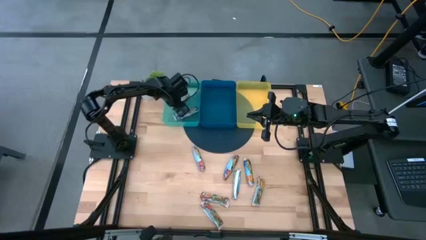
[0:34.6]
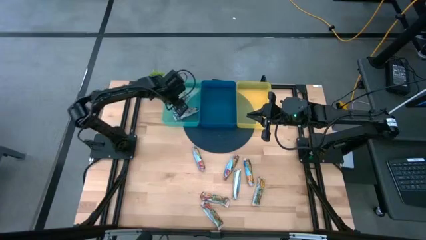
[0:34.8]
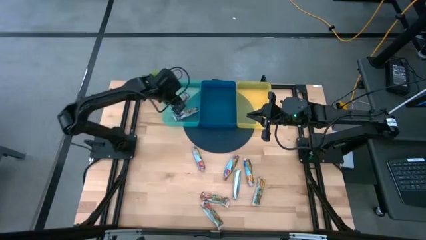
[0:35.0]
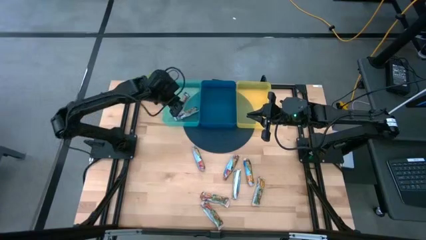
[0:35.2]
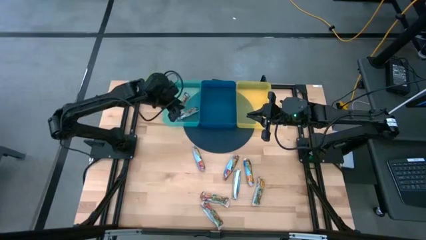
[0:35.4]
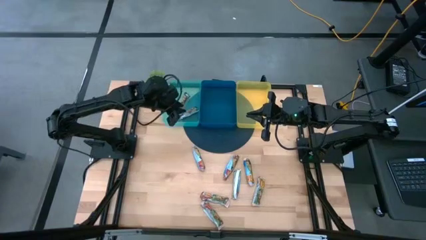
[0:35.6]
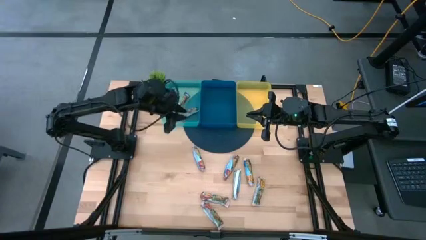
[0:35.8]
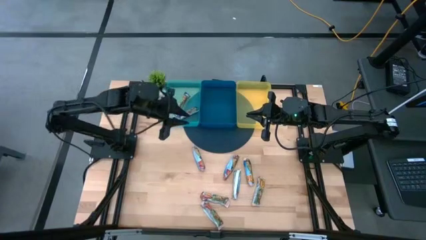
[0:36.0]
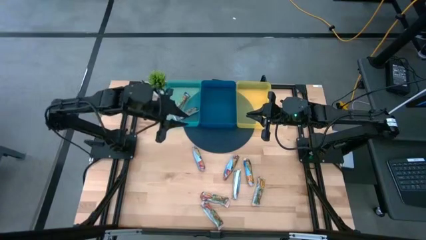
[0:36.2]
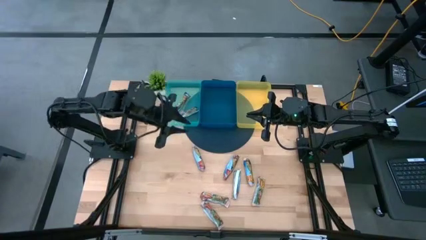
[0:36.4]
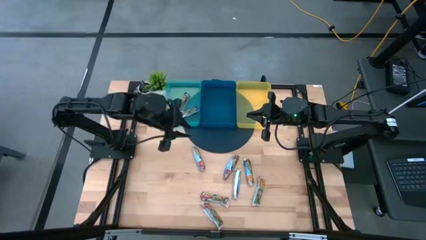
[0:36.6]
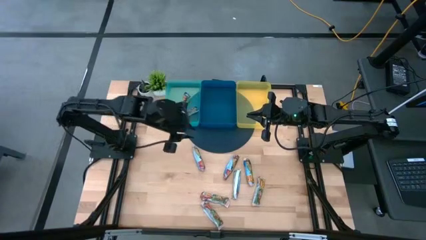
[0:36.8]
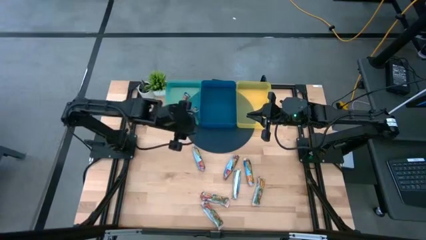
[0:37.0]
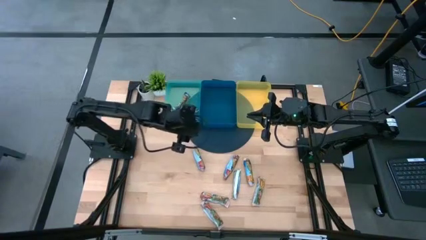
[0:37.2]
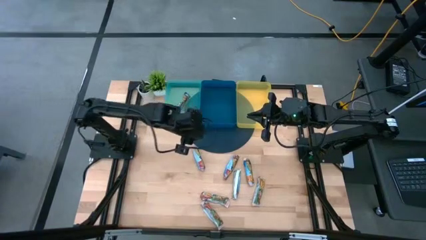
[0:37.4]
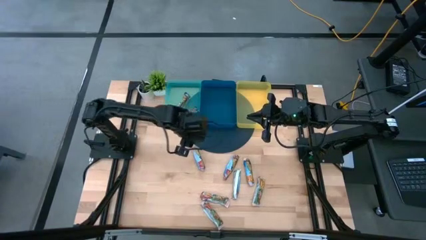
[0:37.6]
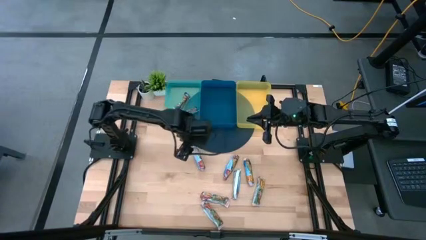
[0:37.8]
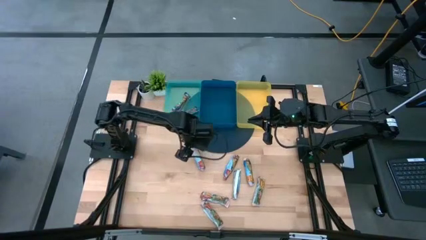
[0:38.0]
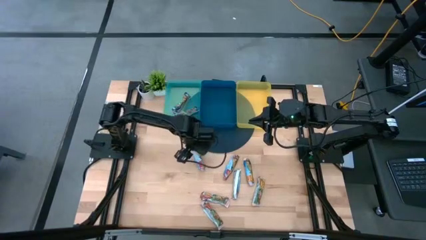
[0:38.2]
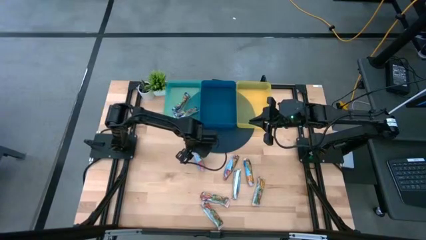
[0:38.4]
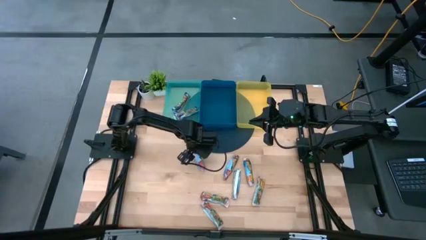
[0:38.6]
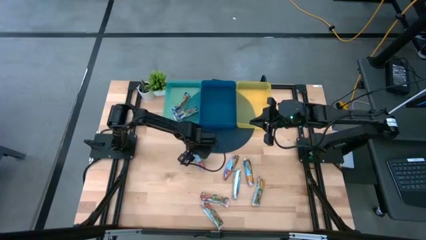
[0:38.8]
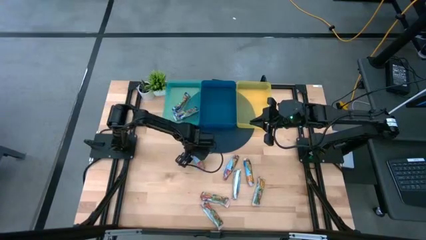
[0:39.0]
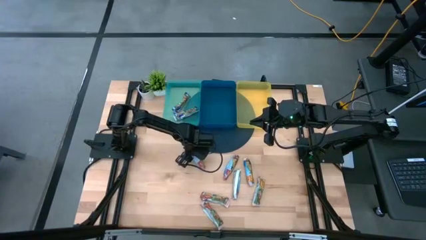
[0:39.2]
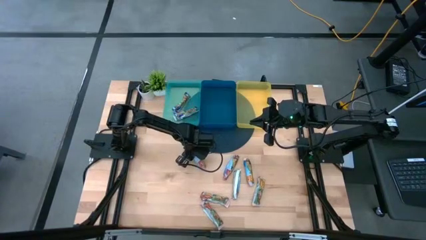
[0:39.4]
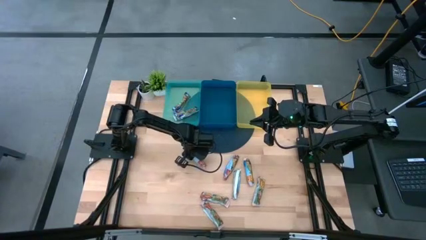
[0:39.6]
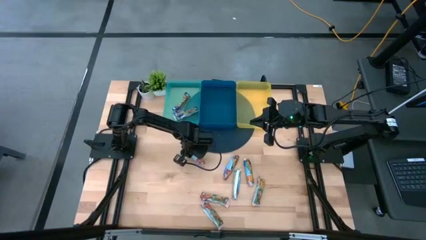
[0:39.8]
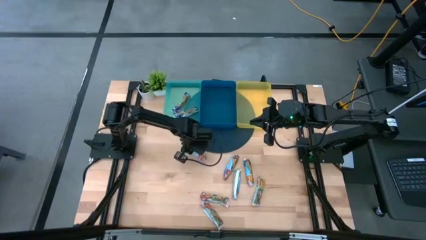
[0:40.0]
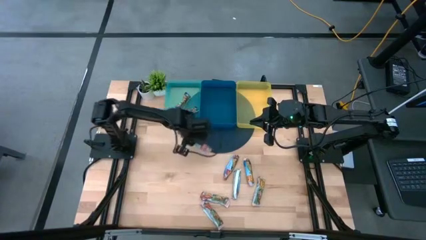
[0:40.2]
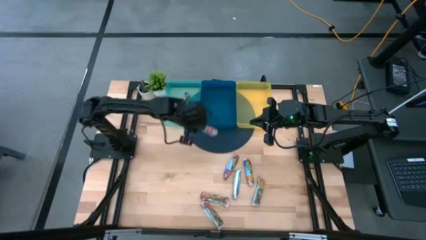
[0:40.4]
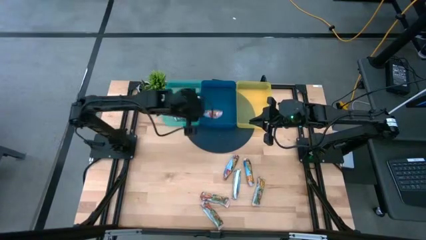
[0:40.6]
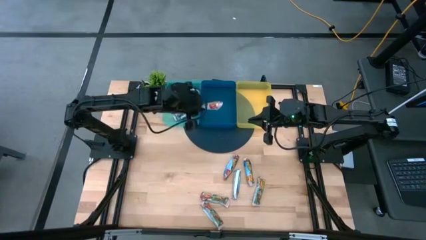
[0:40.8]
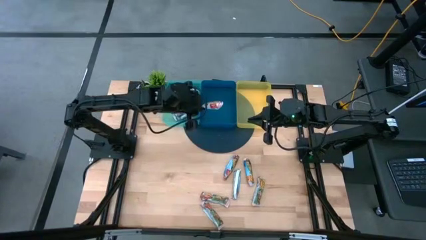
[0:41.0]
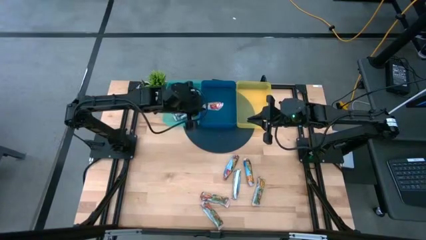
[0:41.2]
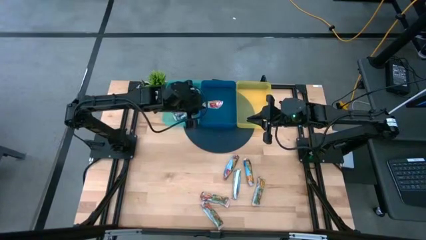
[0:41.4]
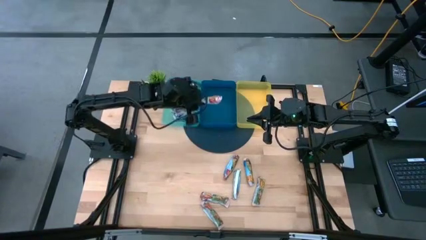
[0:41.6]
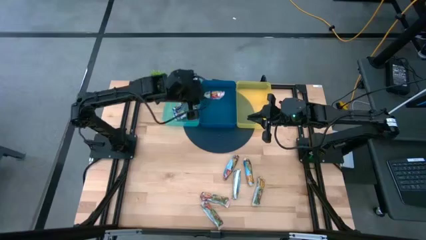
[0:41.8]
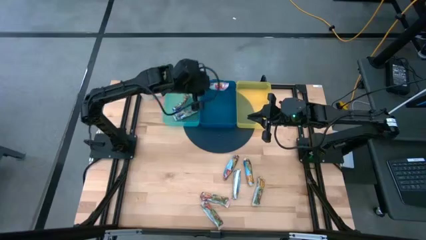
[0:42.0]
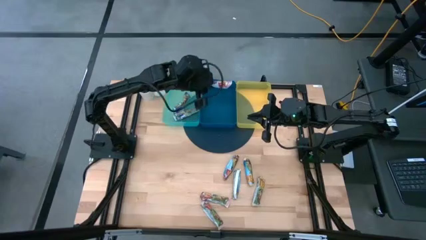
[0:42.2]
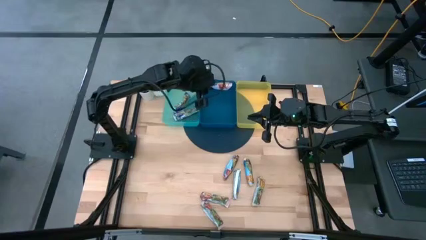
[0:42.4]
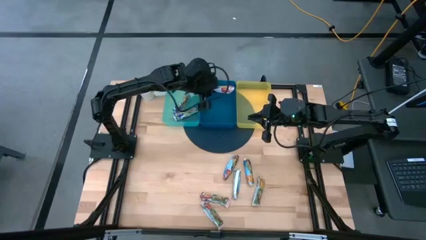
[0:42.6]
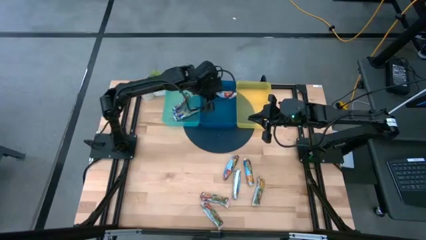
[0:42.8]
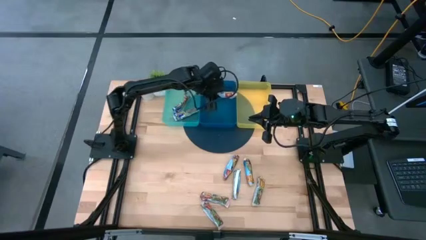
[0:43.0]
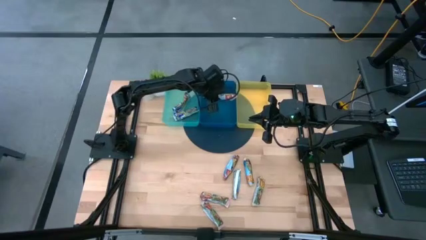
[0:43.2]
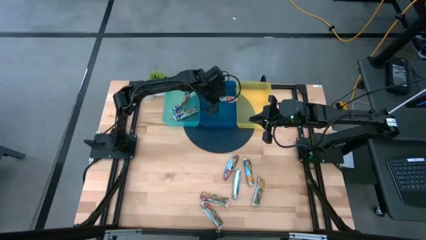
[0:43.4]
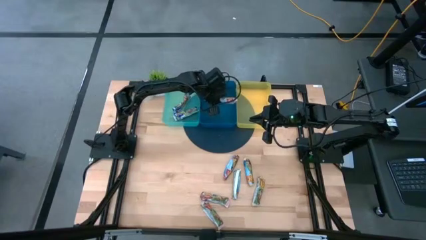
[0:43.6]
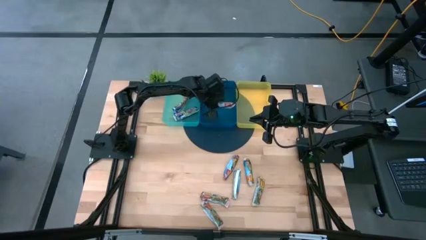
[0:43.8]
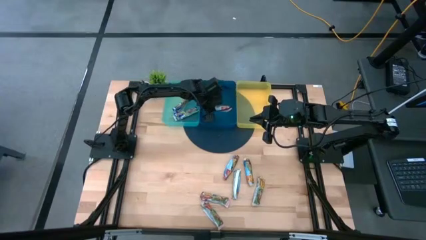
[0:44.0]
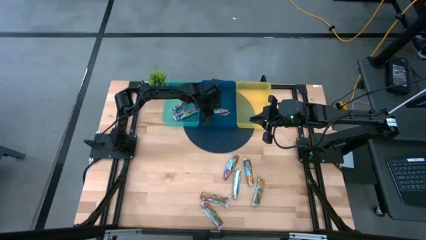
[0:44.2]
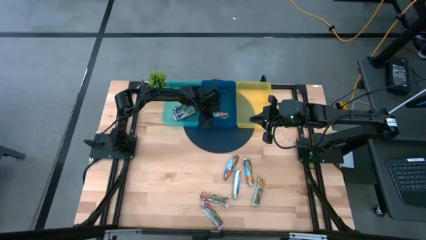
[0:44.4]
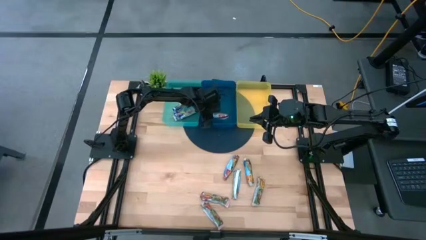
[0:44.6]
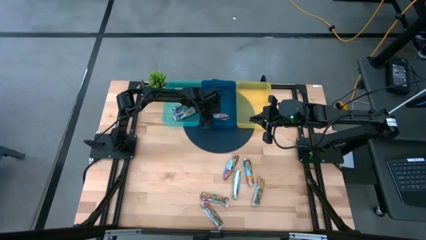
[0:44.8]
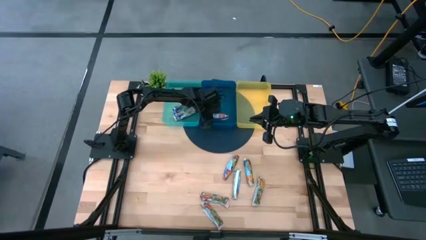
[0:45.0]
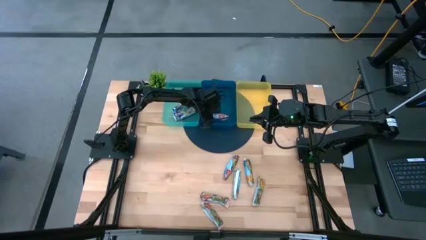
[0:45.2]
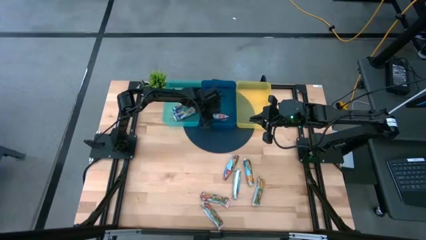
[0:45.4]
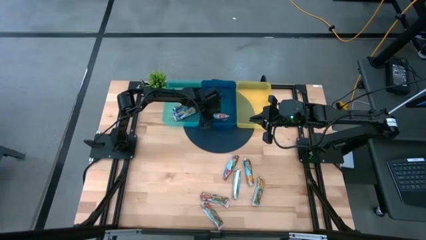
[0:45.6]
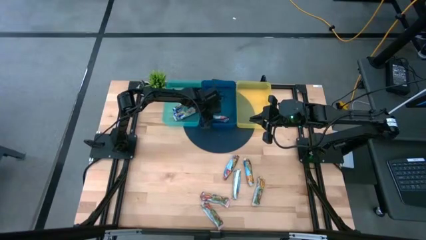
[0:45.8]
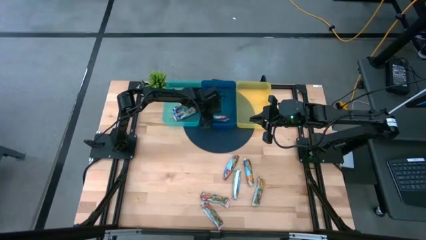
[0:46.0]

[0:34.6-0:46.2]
Task: Pick and place Granola Bars by type
Put the top left red granola bar into the blue bin
